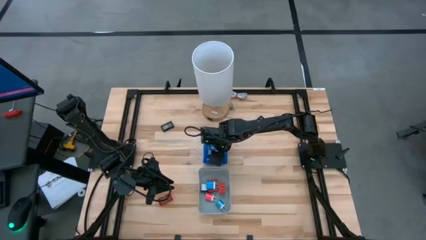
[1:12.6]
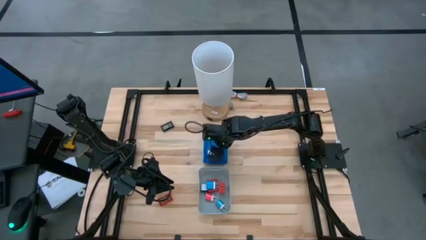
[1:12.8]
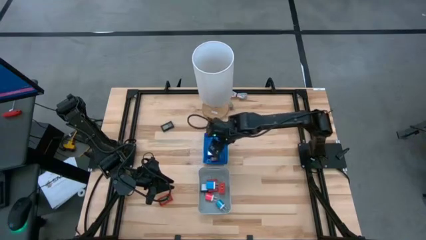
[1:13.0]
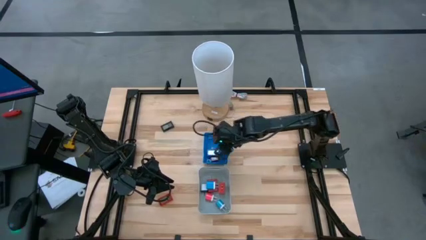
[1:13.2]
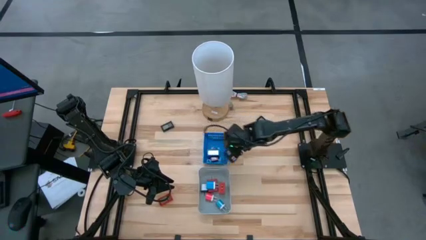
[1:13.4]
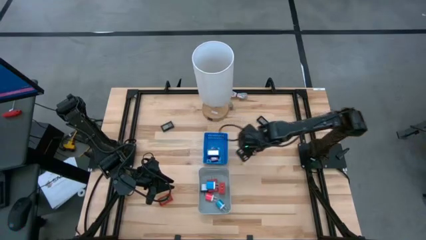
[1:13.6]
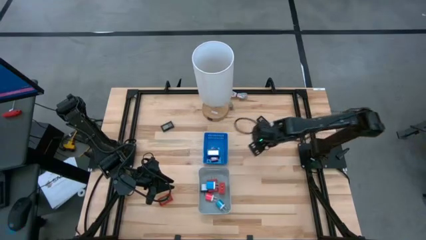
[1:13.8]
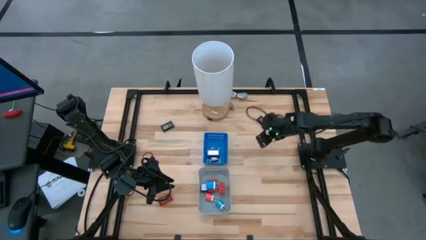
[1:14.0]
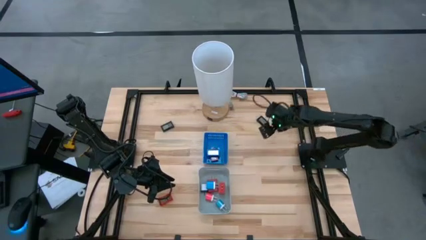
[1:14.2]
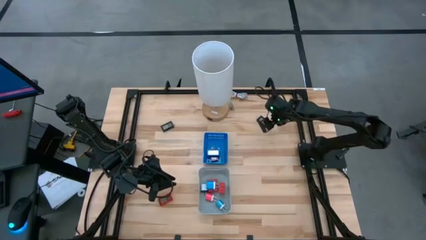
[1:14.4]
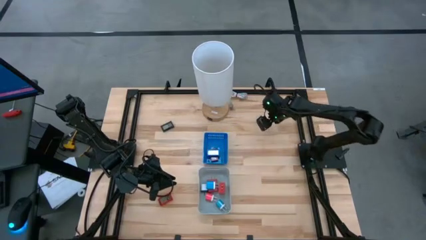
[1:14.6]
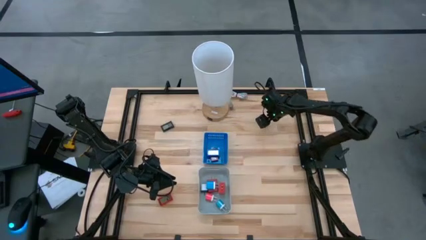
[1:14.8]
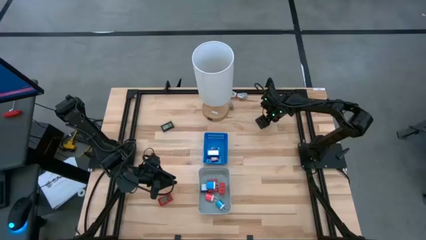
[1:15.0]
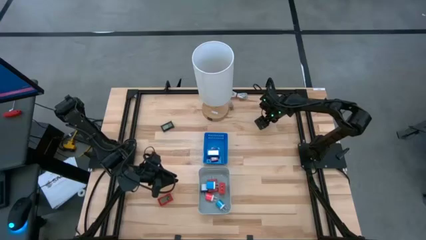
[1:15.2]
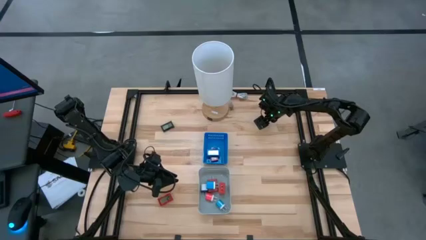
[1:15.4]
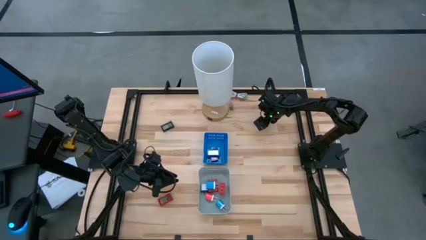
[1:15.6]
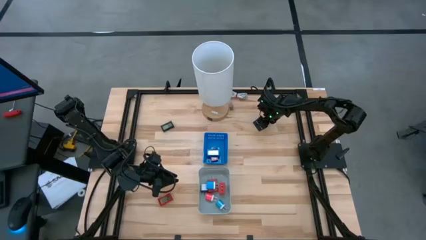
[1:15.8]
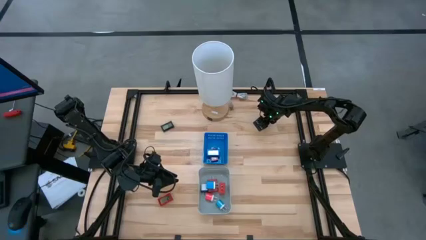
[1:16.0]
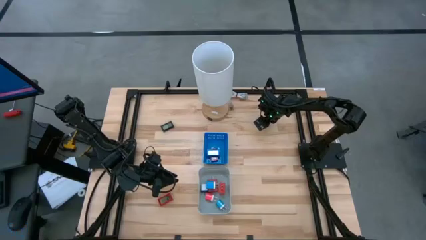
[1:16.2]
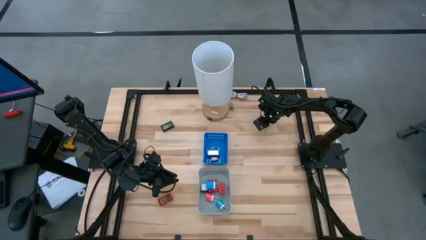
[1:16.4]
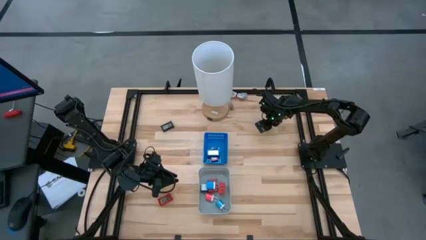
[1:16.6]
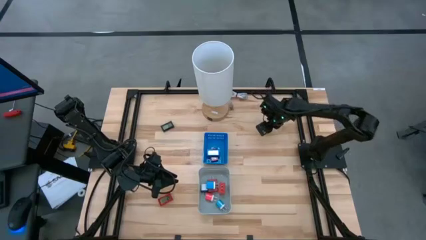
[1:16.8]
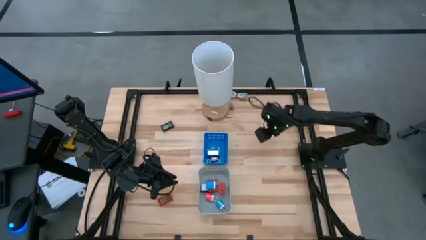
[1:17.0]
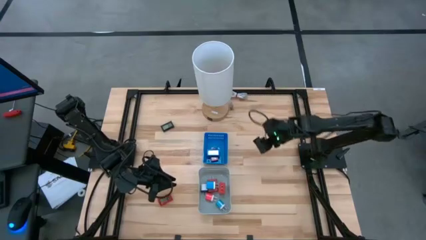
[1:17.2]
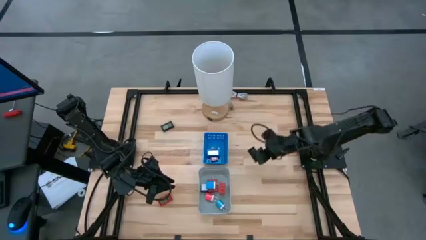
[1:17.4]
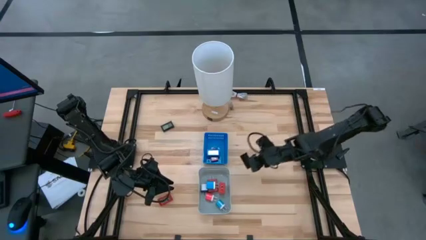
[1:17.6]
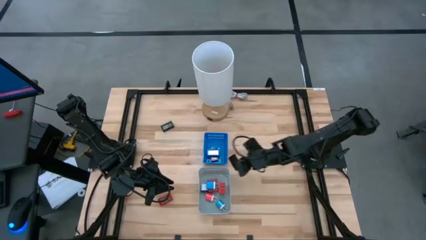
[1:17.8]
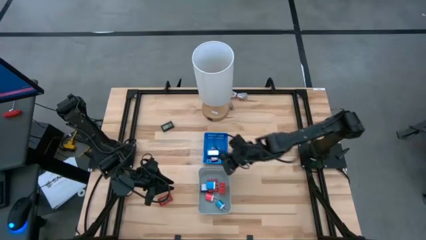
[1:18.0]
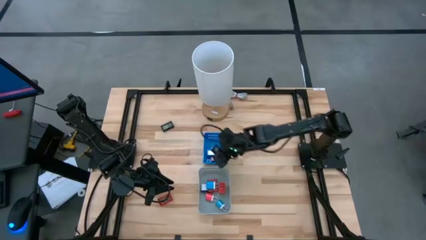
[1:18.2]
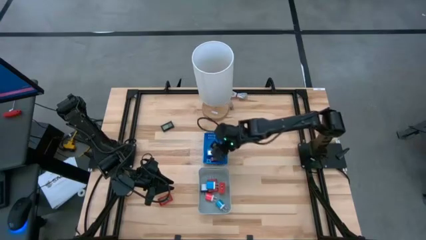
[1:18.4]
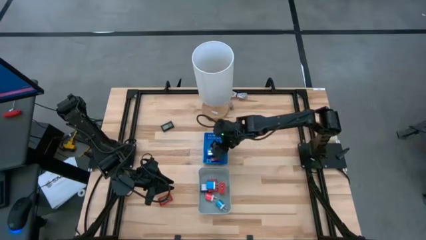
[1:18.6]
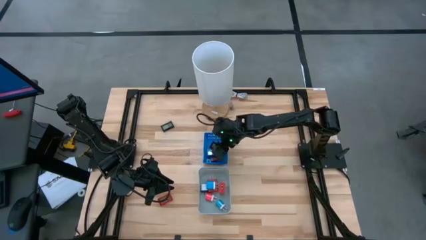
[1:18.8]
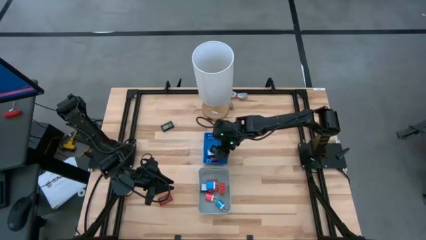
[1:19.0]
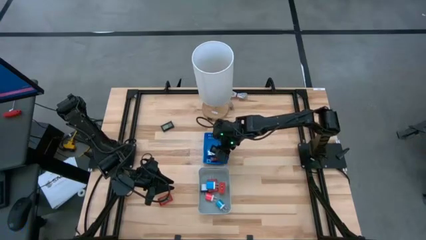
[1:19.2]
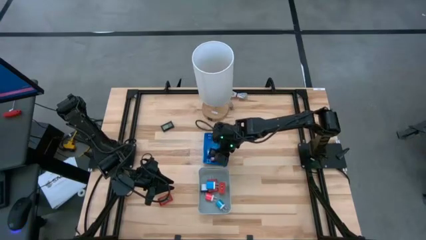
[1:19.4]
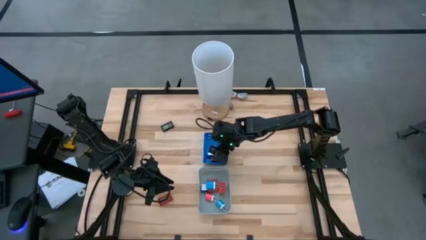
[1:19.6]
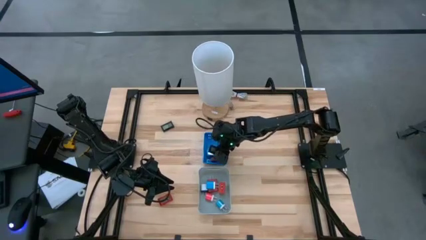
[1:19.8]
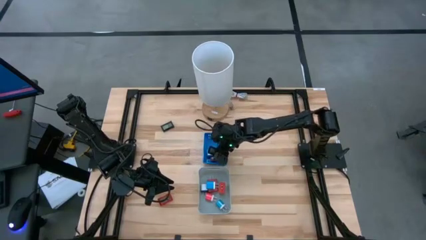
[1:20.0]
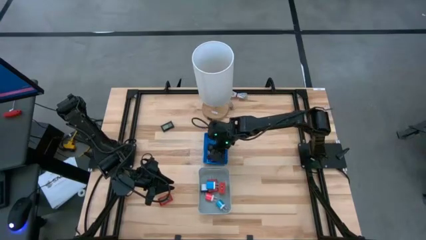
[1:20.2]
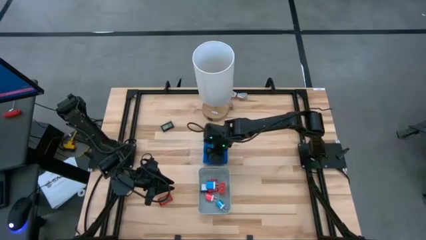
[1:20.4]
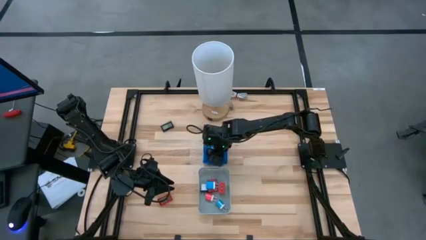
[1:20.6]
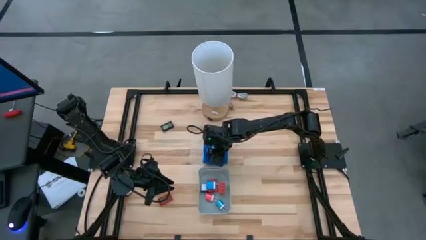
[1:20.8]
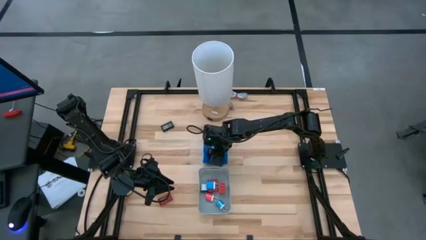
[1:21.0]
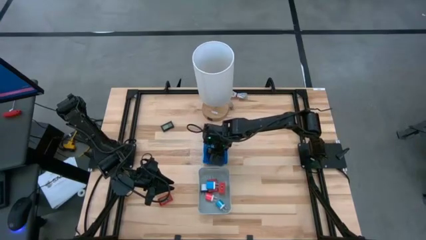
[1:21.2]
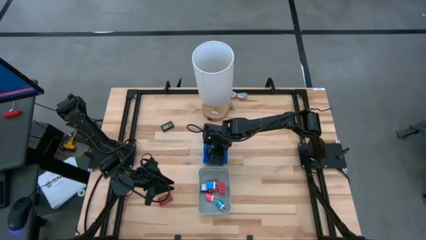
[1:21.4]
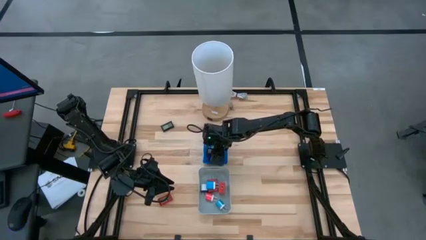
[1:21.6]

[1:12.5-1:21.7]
Task: Pick & Place Office items
Put the right black digital clock into the blue bin

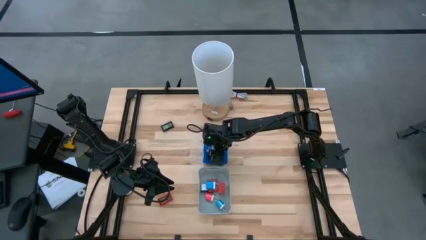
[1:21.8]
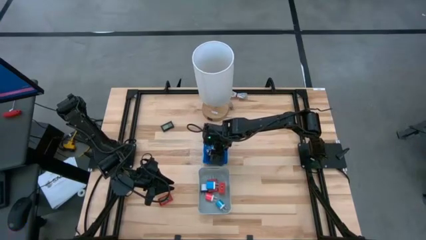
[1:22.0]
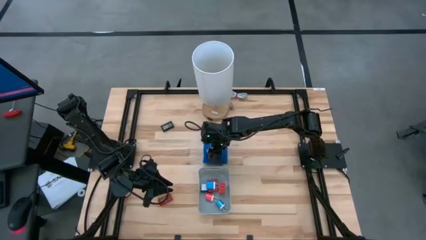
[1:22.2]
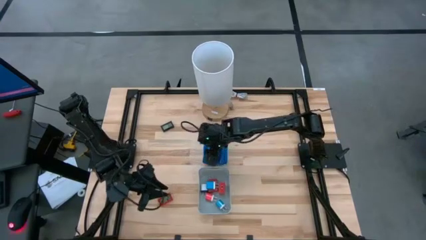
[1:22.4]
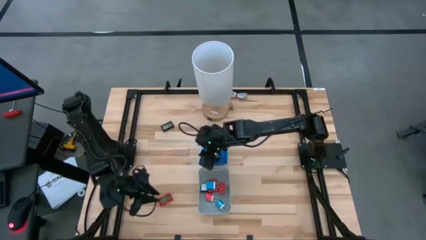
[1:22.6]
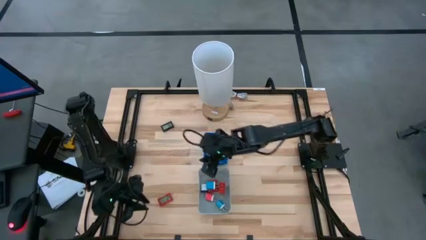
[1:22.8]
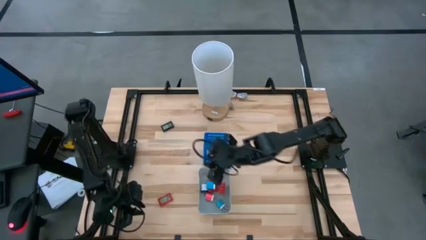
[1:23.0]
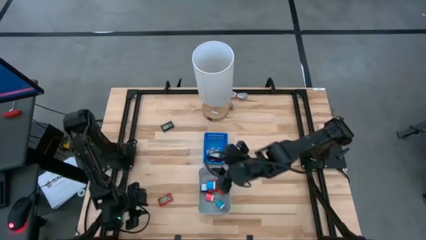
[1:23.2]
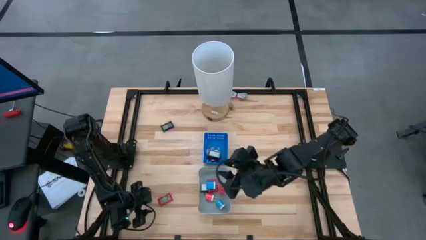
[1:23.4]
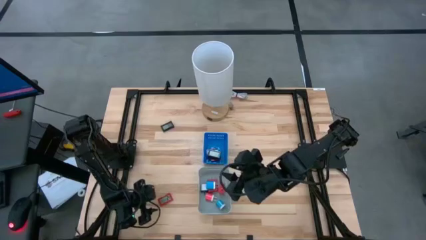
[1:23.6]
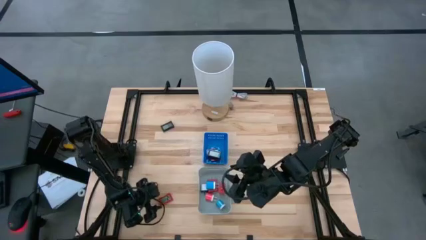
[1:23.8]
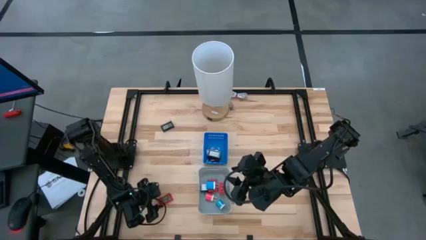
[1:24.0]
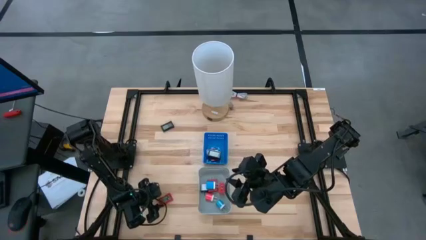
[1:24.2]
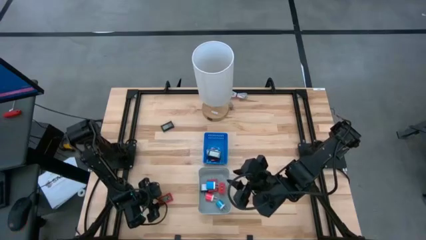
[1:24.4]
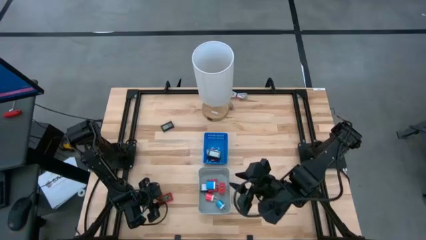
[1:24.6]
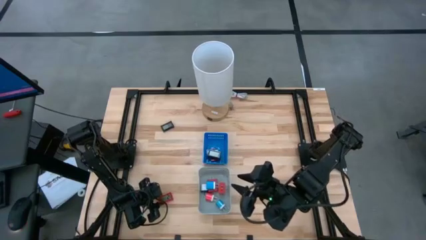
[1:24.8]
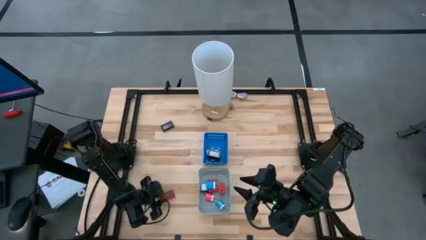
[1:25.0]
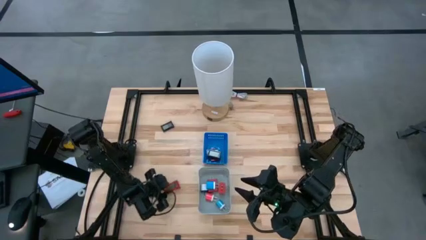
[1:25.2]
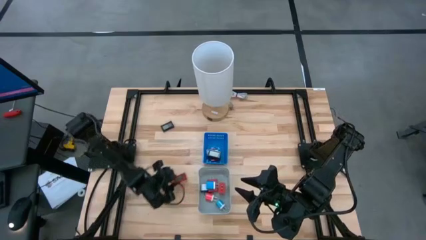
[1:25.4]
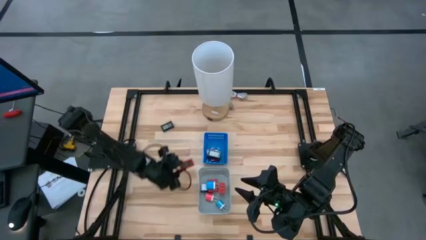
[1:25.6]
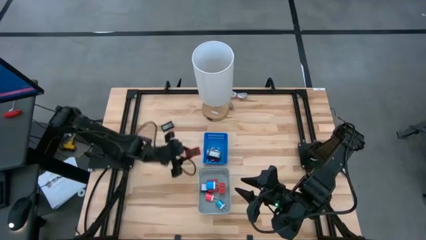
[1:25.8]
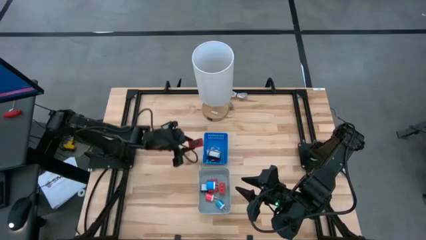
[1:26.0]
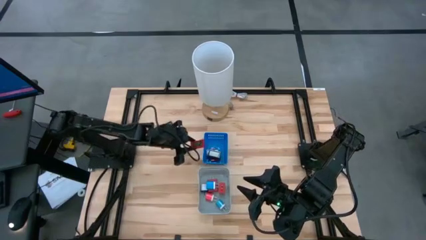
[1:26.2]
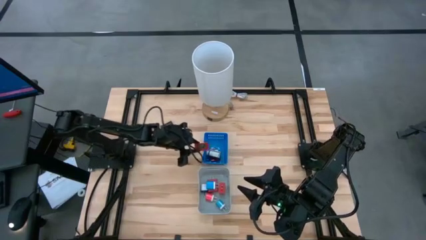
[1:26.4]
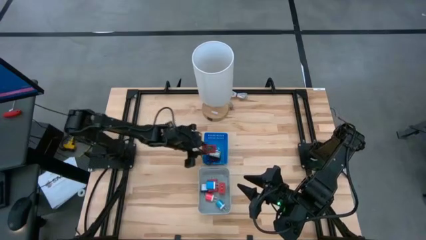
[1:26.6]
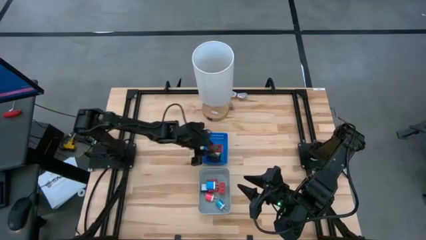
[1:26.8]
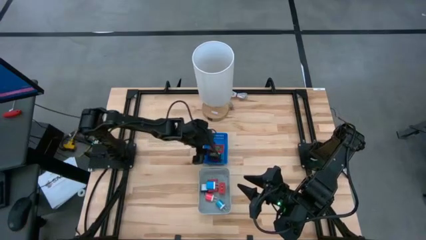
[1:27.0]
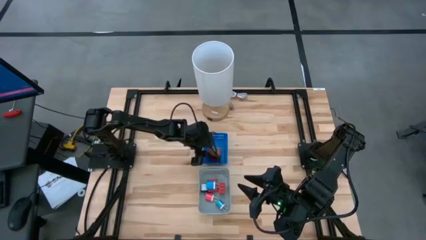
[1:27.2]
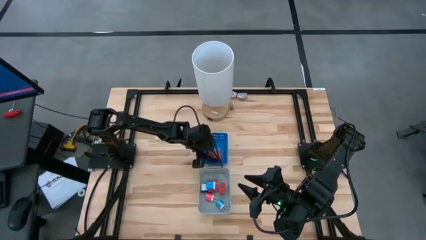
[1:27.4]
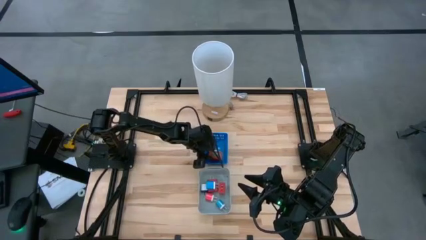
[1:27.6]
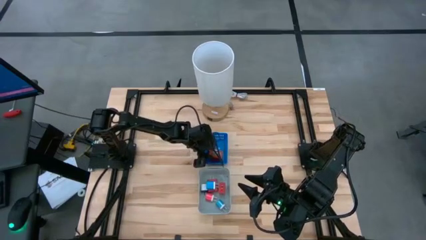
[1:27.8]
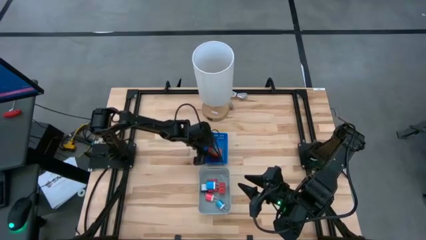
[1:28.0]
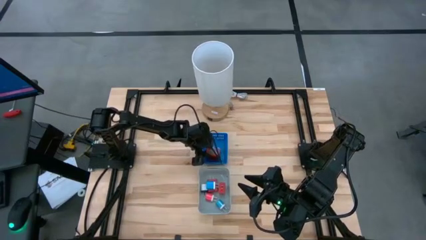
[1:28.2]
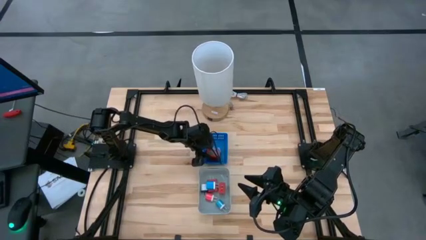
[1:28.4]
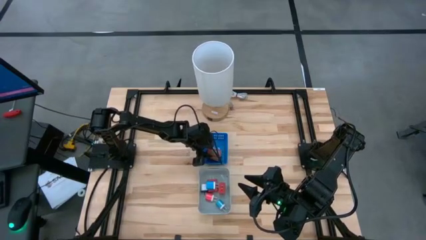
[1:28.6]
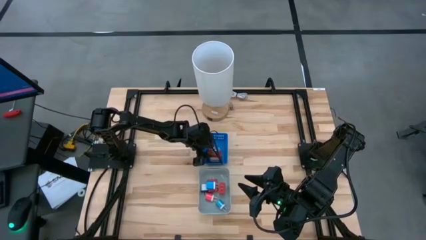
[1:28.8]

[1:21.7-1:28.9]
Put the red digital clock into the blue bin
